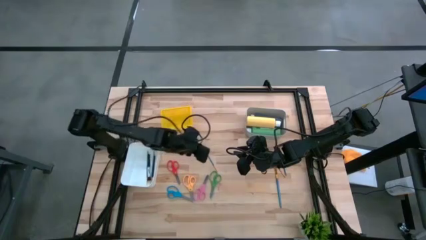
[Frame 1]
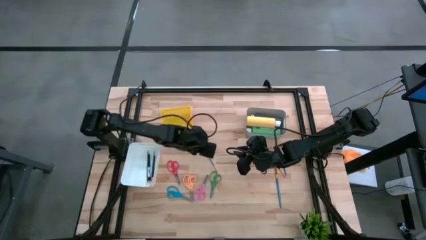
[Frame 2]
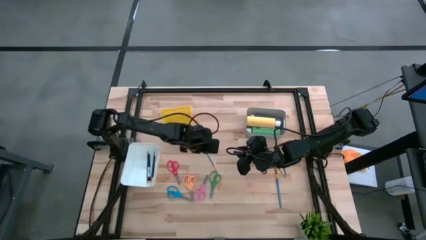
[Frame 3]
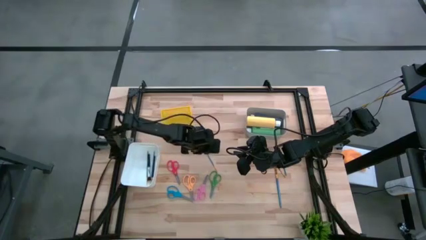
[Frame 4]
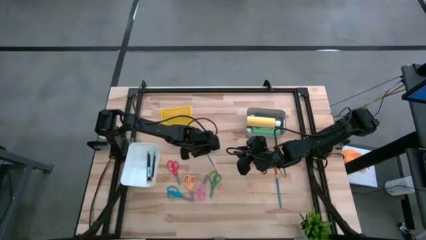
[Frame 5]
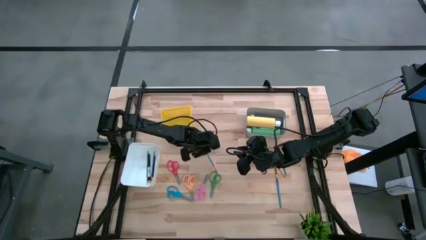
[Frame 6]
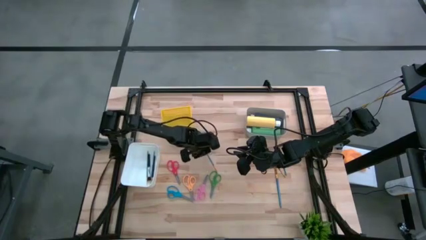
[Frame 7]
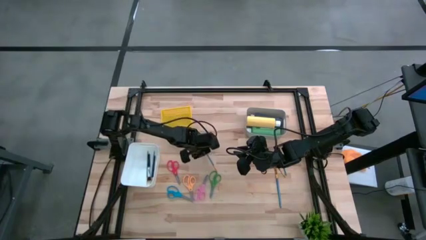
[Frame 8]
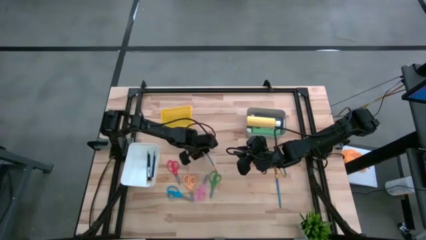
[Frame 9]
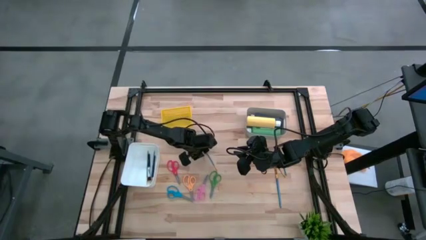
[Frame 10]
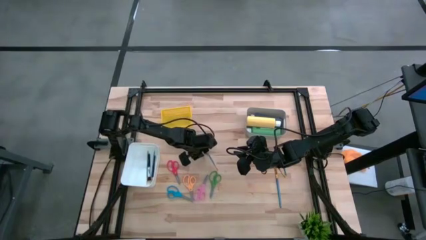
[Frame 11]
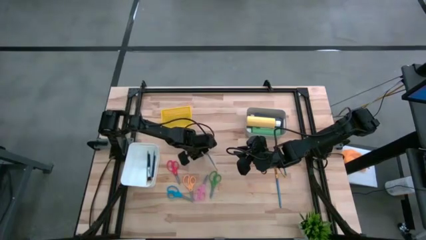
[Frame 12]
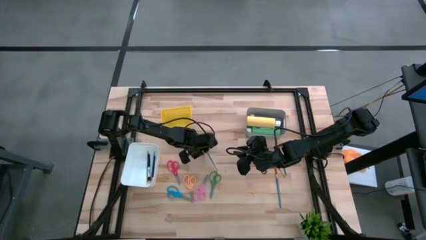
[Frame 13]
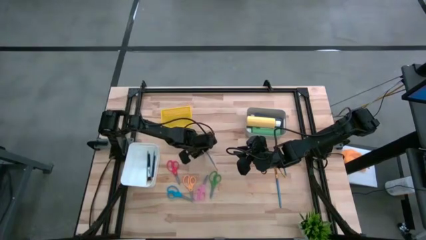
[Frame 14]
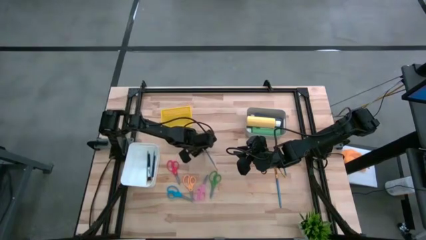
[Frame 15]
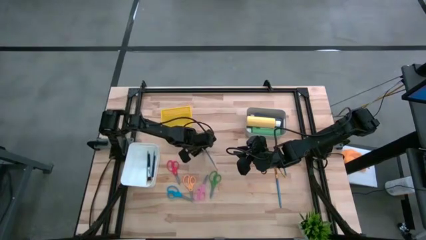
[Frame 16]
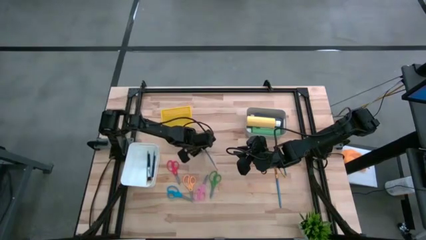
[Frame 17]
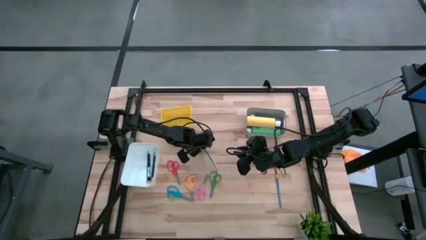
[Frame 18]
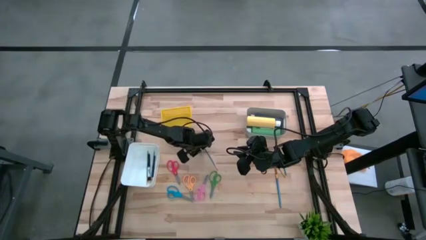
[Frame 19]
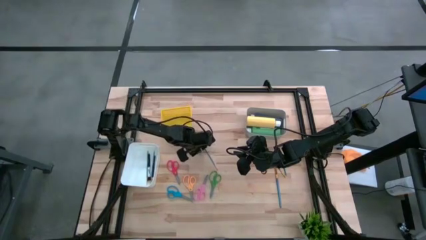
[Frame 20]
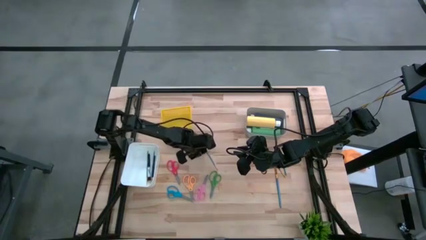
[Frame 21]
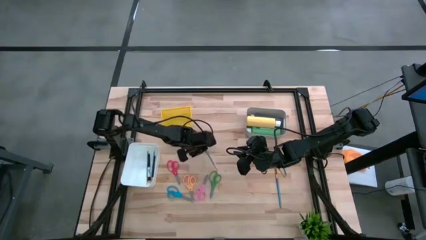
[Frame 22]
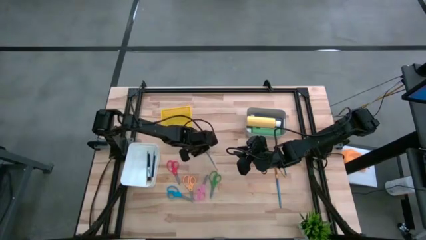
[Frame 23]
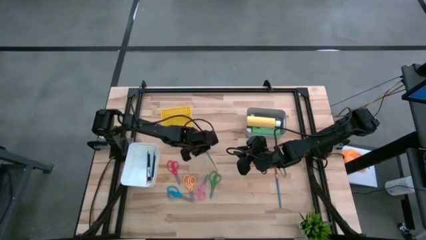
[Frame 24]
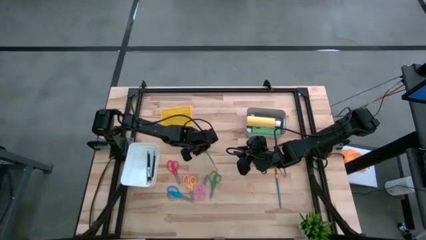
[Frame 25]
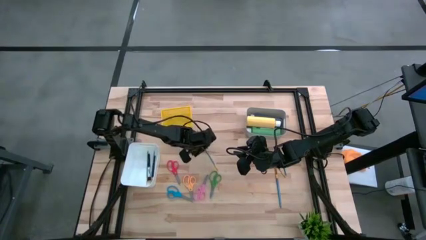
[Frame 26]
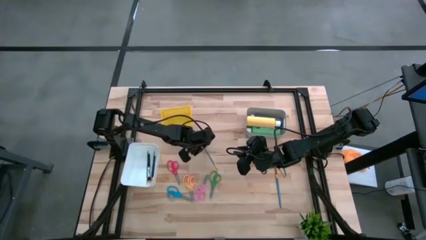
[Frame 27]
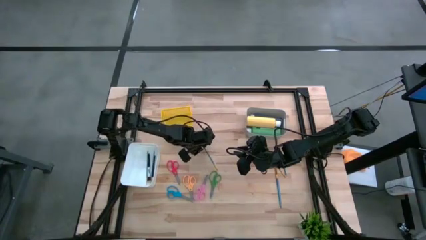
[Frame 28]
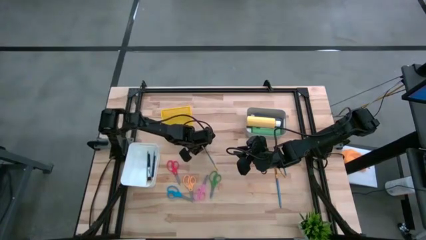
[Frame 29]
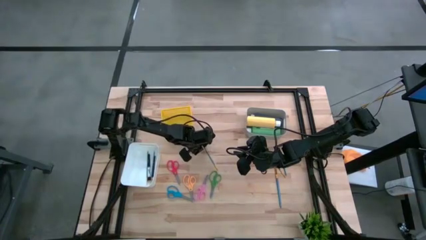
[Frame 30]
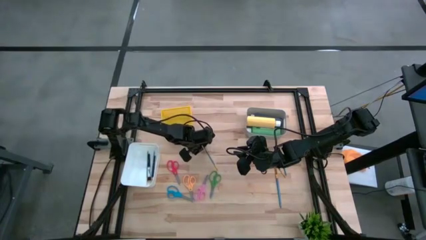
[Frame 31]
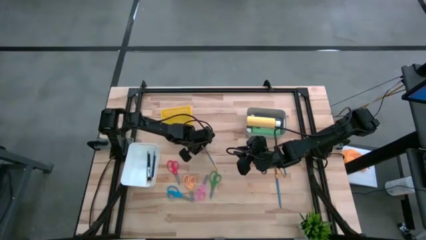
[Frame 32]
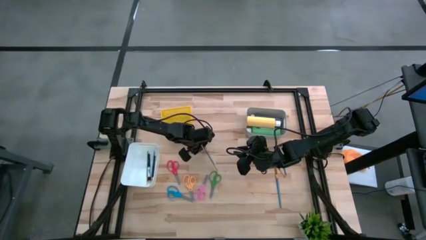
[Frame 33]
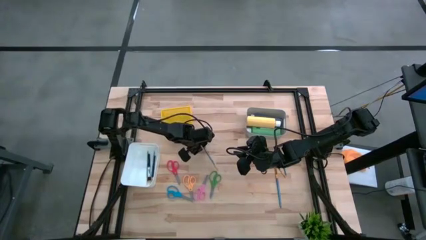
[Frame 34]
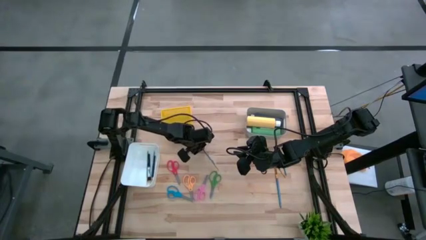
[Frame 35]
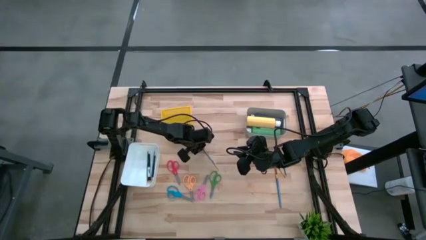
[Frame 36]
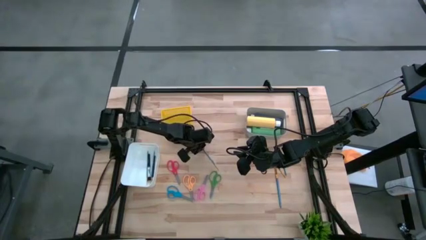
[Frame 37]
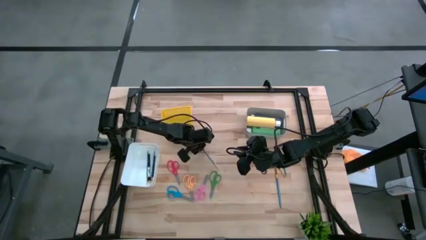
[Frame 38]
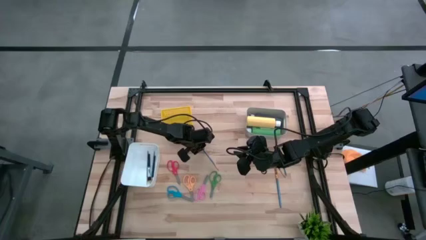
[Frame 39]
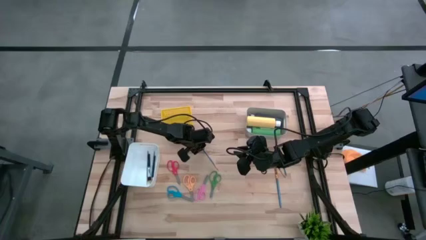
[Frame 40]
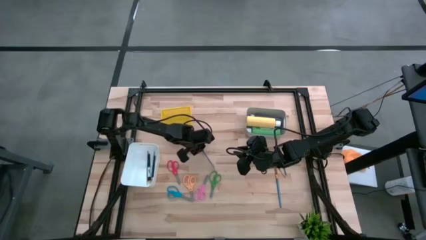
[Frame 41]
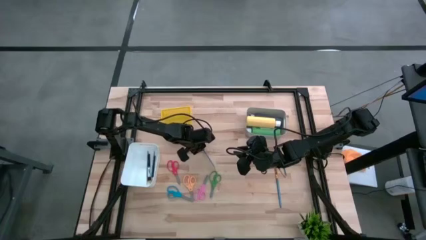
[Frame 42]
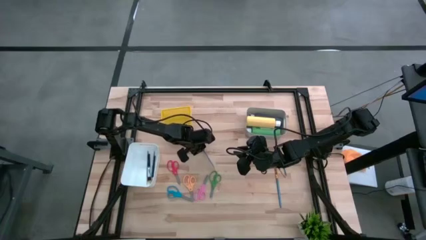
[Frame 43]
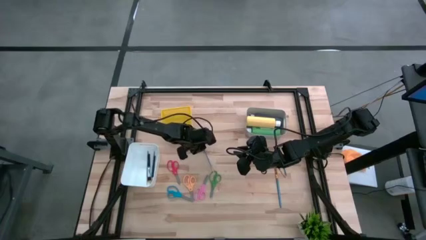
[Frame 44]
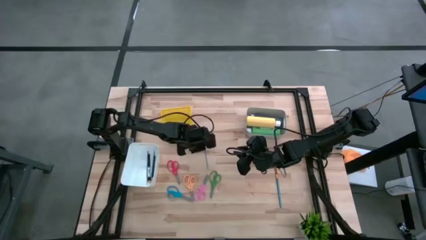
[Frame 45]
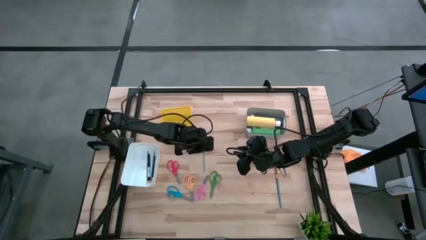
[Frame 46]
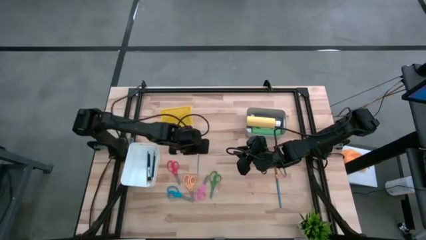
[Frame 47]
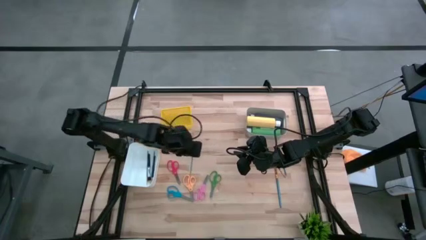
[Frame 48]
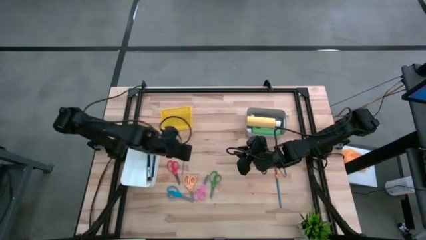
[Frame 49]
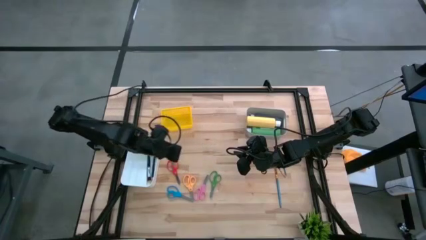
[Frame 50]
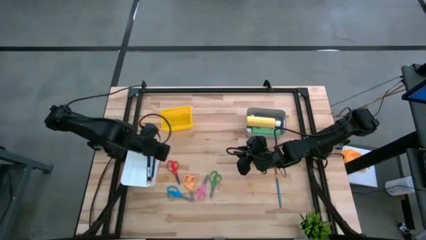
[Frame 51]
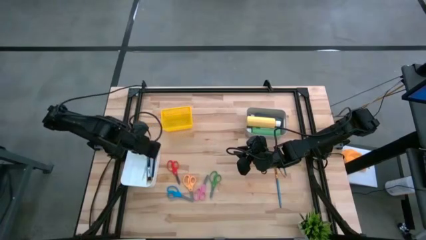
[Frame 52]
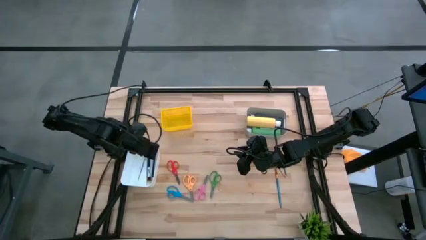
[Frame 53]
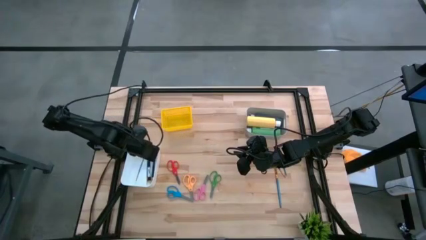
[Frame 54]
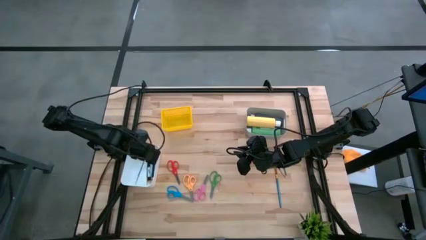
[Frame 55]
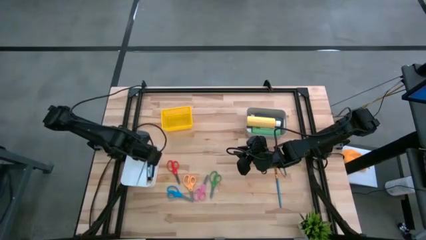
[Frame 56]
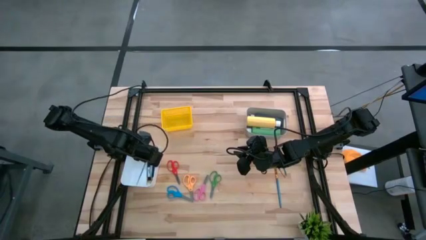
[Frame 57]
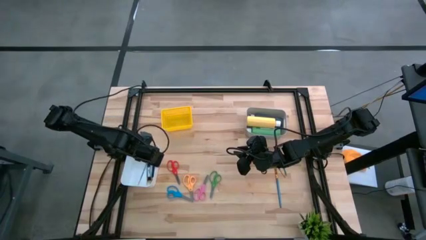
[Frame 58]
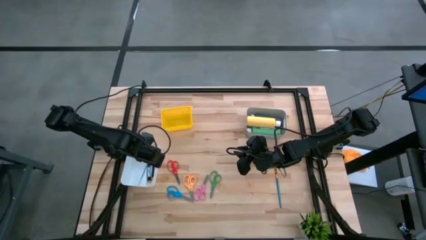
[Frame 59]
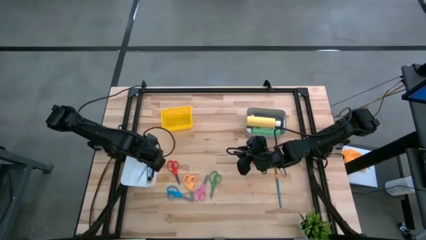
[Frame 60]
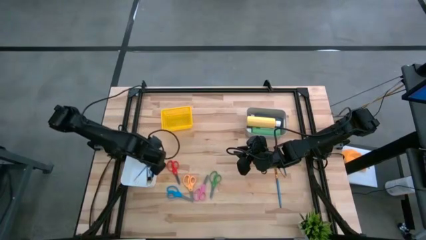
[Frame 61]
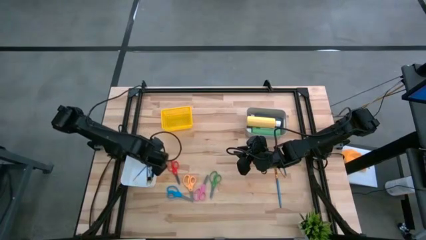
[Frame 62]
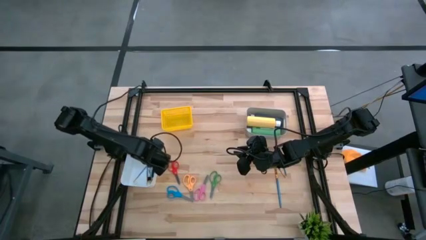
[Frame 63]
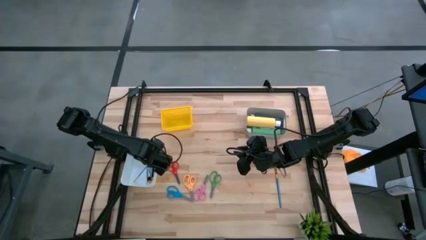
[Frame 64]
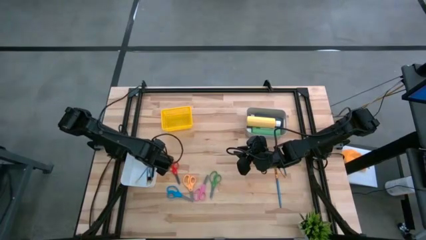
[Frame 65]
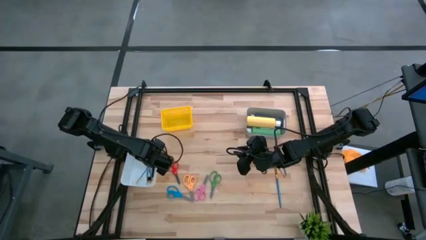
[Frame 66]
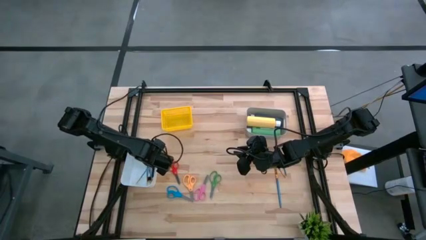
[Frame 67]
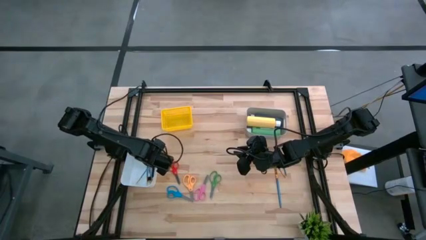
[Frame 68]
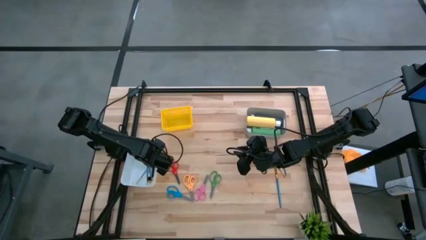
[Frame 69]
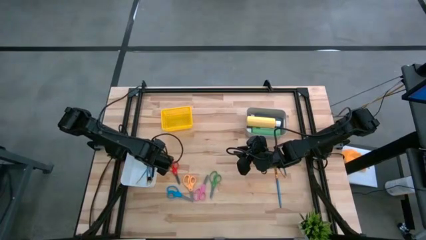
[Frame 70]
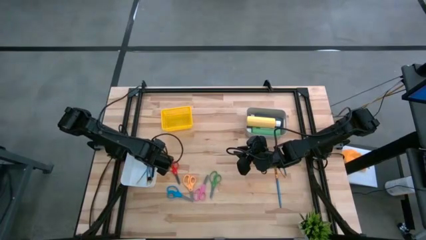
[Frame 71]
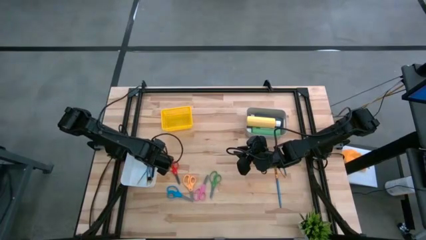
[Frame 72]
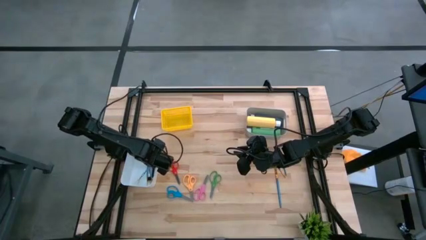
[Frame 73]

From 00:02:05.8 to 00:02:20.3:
Task: Pick & Place Paint Supplies
Put the blue paintbrush into the white bin
